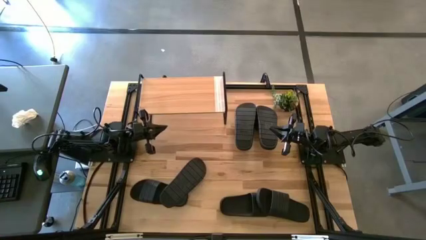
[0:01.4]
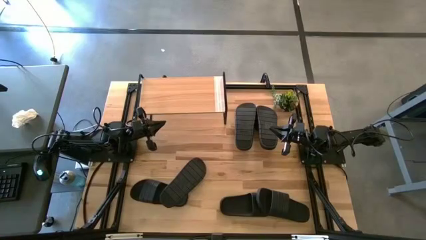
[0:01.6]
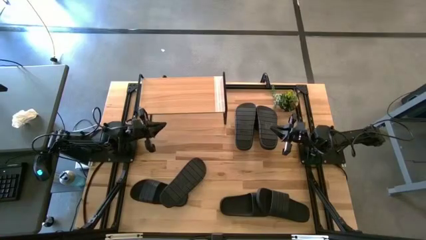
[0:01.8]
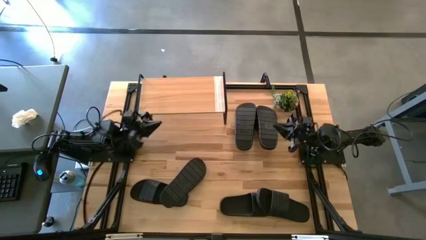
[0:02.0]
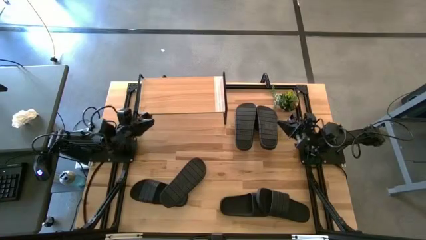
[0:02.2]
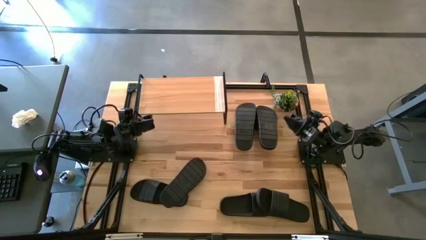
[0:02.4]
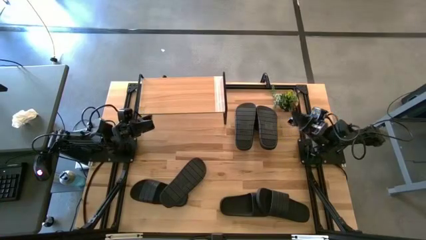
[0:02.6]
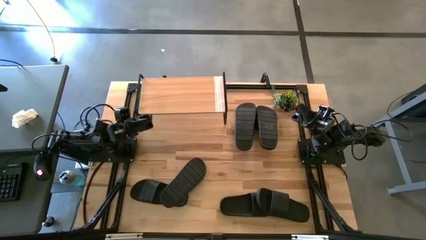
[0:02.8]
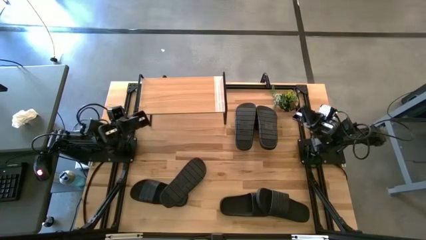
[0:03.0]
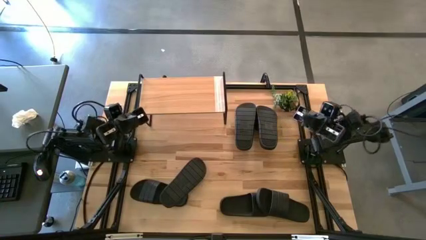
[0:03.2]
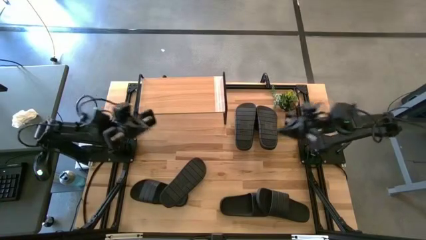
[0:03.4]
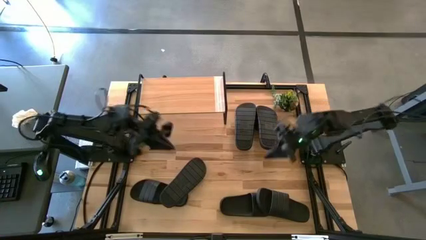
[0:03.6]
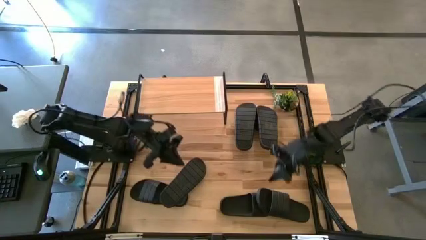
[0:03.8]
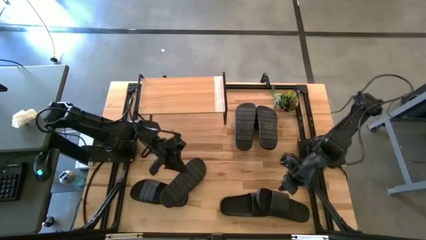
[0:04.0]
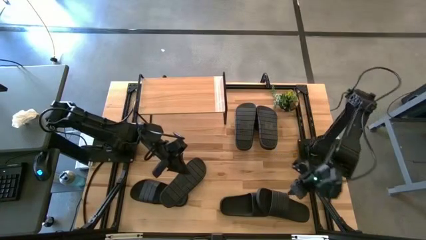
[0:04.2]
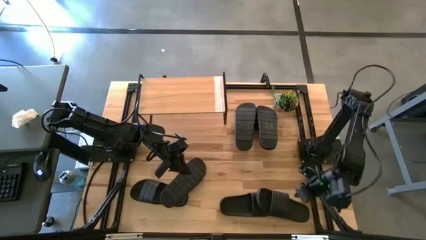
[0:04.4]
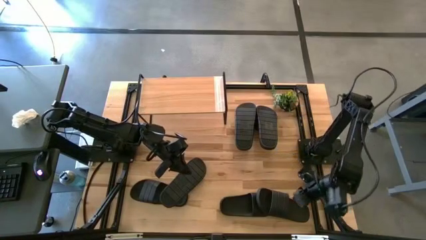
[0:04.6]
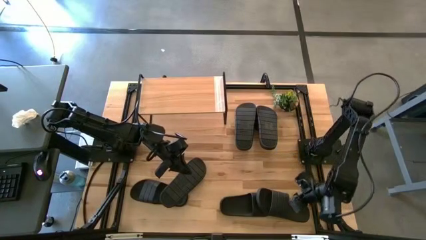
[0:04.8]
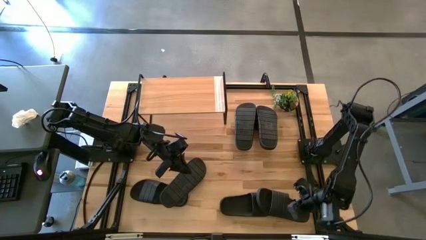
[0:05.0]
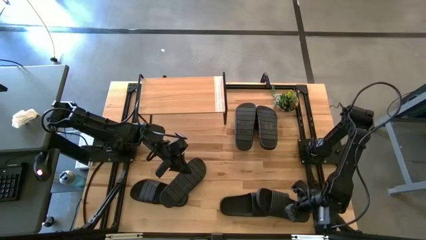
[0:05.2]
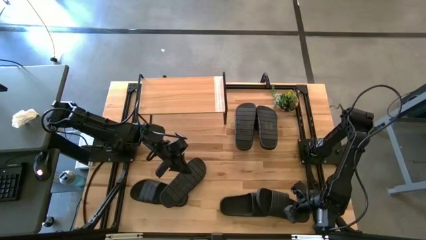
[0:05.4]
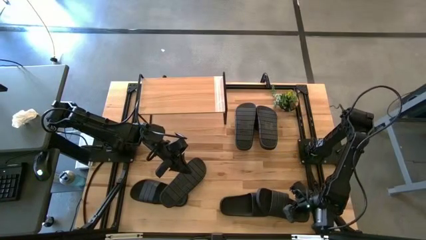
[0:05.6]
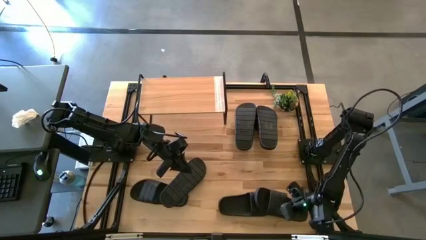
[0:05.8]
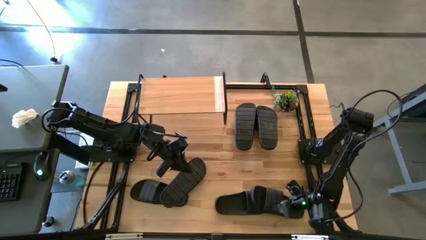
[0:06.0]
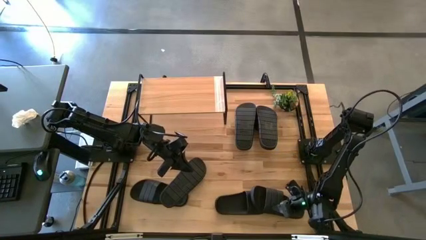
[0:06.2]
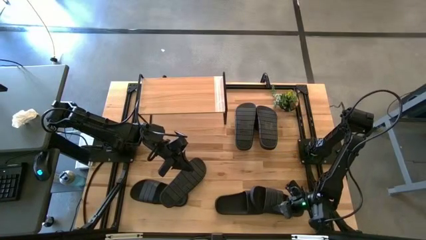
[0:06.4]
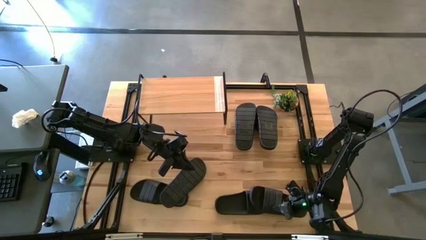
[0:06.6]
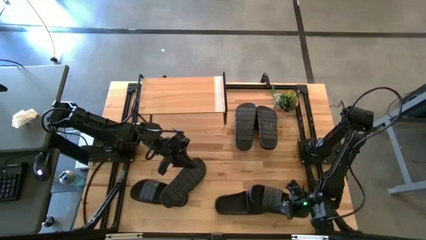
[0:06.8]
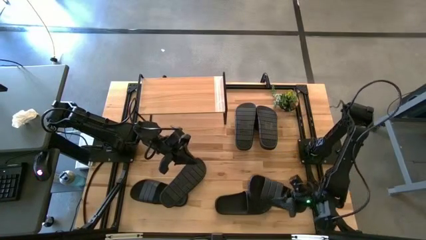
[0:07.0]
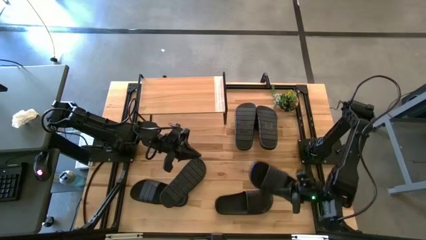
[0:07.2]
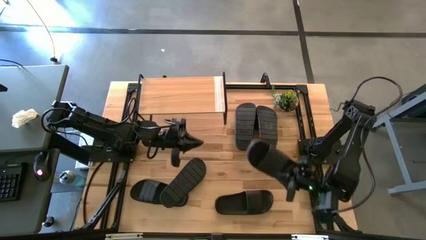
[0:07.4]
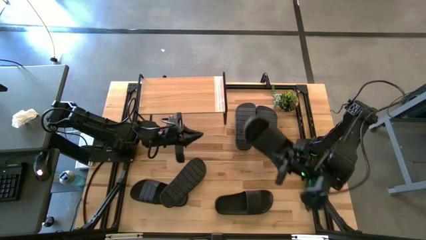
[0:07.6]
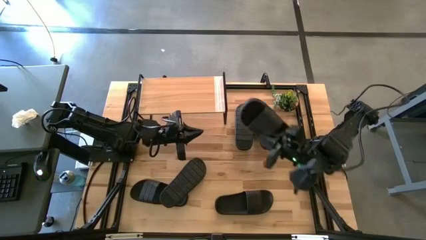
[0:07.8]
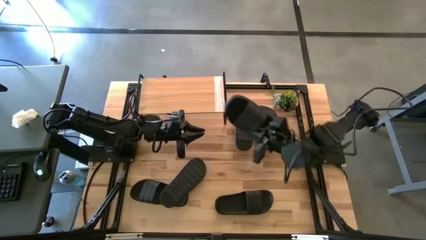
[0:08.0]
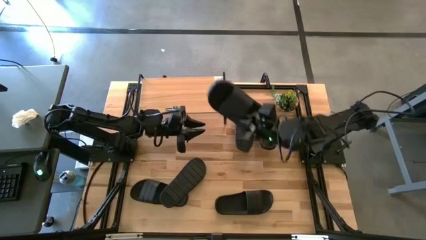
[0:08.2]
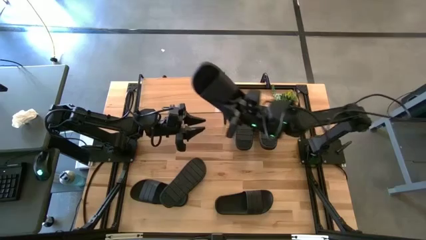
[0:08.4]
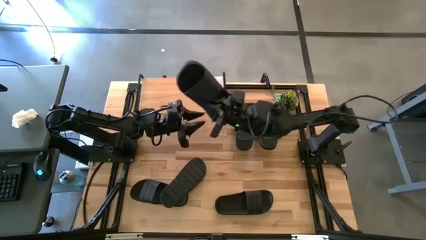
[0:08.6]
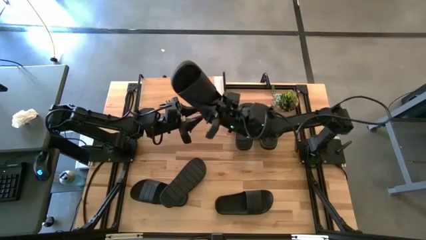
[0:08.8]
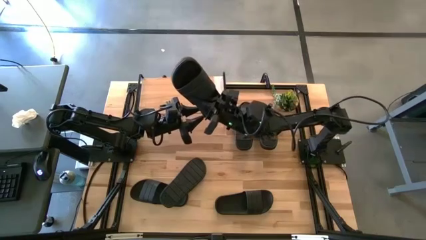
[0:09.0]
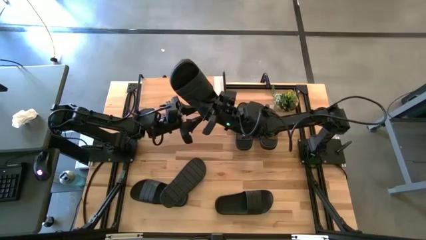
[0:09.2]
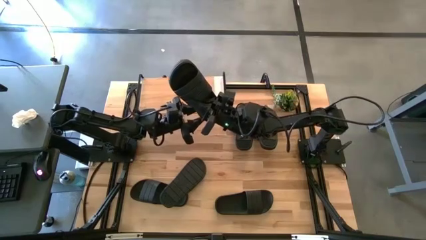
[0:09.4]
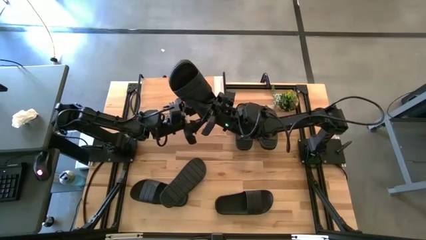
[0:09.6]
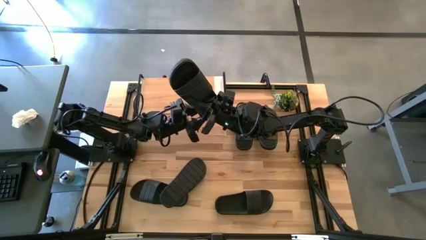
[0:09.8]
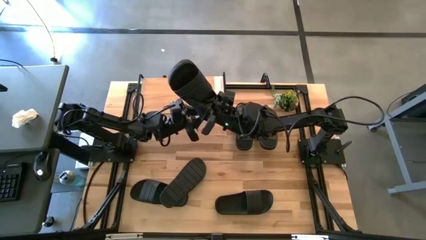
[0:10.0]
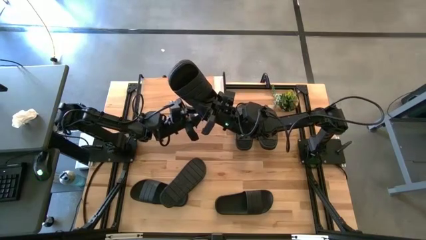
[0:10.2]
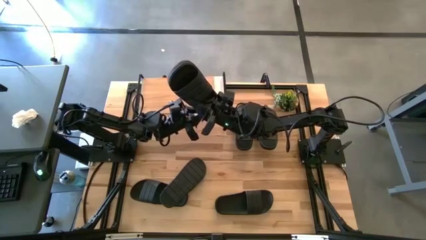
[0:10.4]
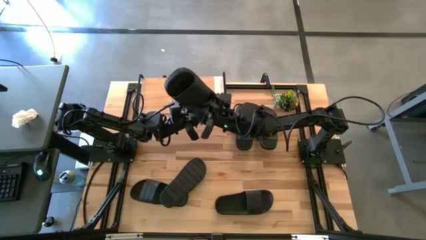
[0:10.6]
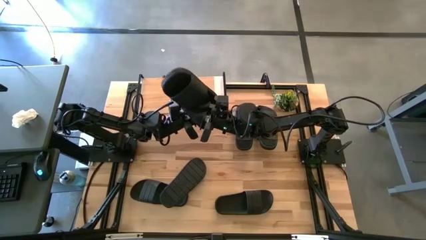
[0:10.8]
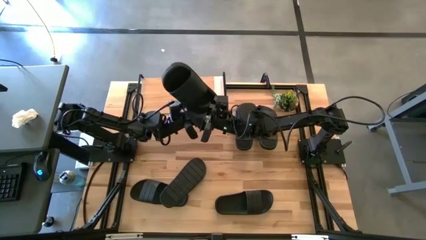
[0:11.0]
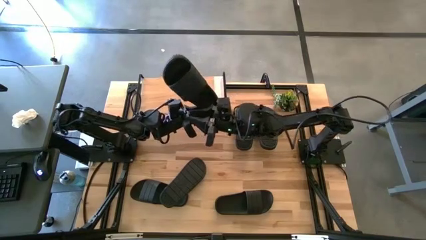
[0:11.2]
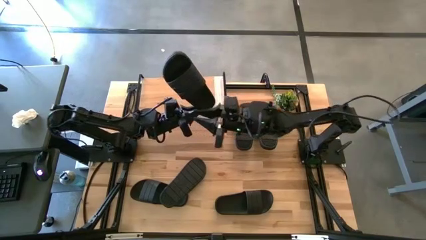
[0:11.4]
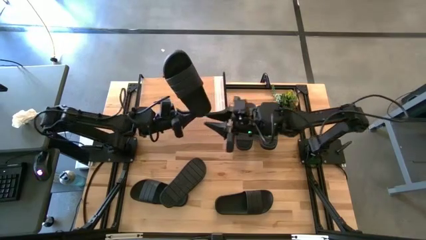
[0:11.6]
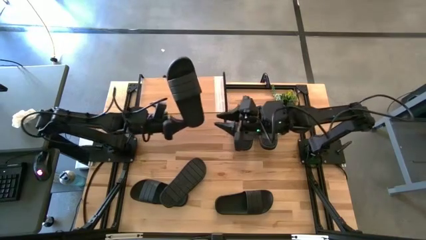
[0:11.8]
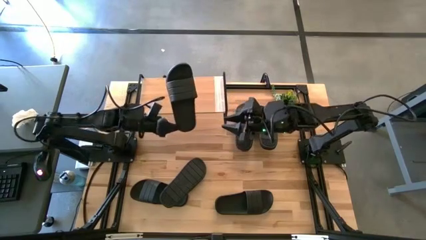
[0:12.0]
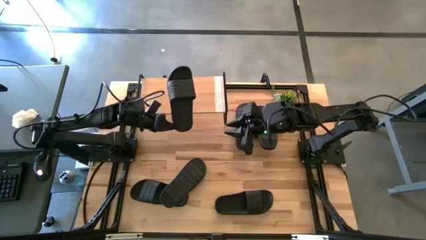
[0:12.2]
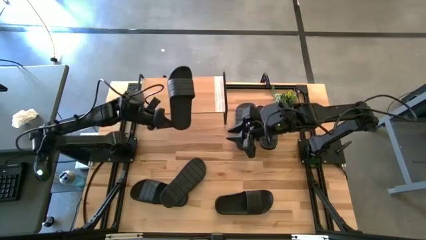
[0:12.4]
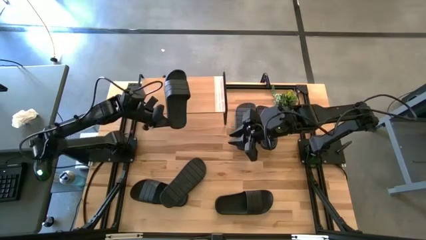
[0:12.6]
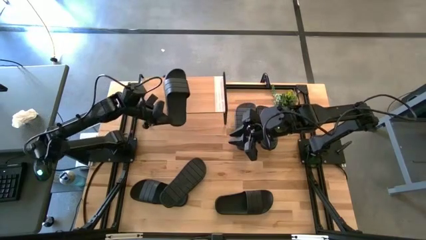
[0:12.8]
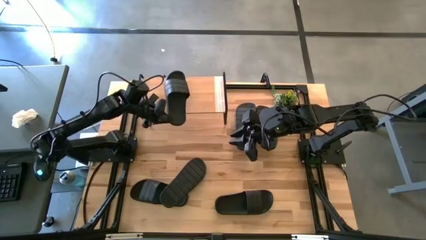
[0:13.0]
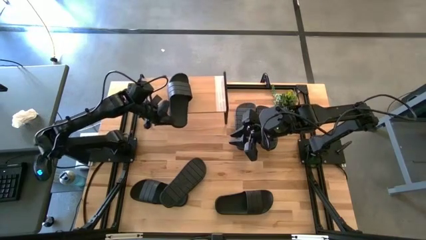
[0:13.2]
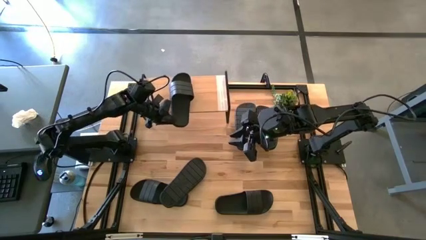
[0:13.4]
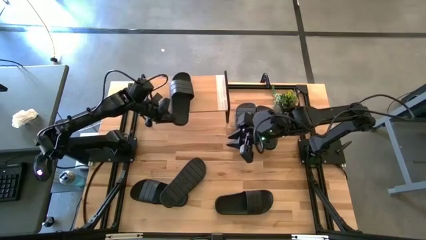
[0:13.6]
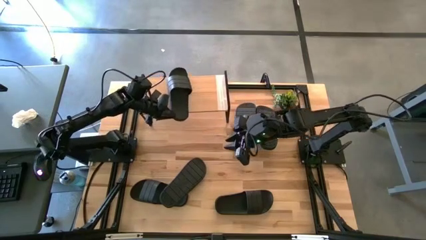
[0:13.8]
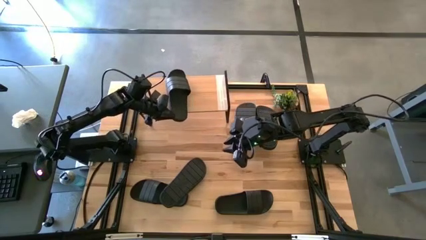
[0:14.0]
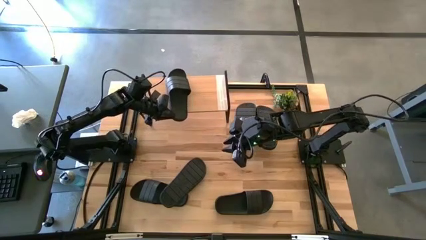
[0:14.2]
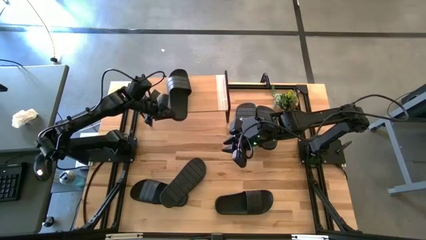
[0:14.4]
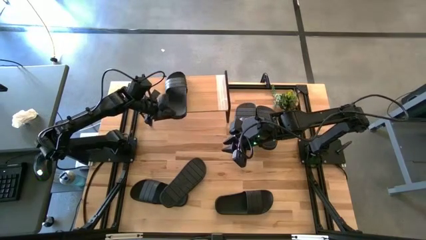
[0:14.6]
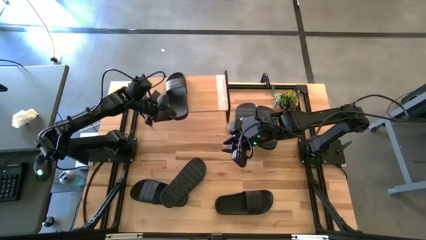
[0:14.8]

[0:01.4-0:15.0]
Task: Pick and place slides into the shelf
Put the black slipper on the shelf

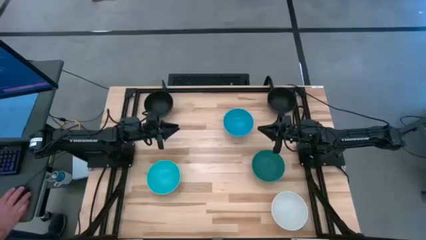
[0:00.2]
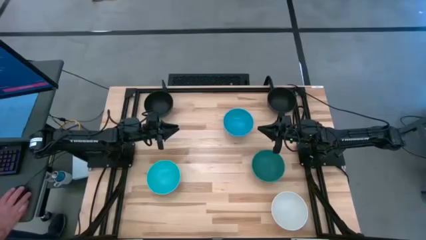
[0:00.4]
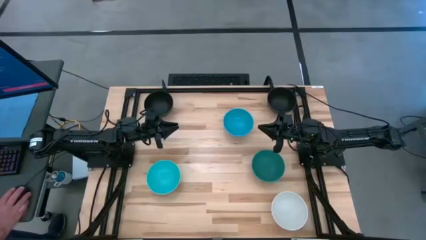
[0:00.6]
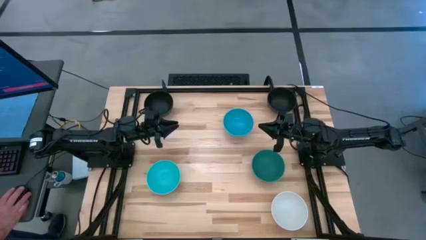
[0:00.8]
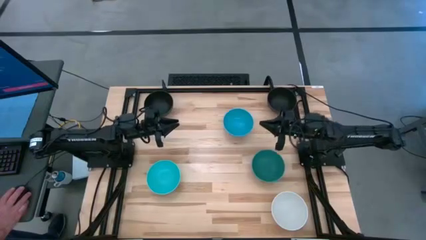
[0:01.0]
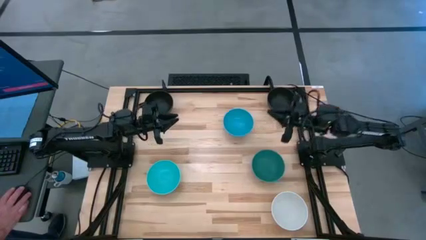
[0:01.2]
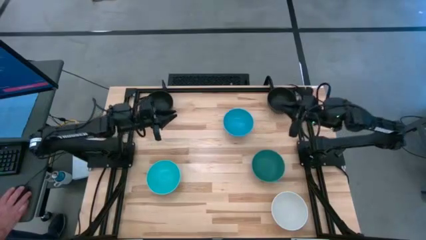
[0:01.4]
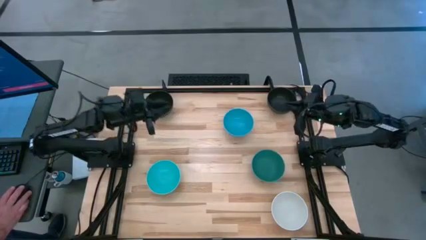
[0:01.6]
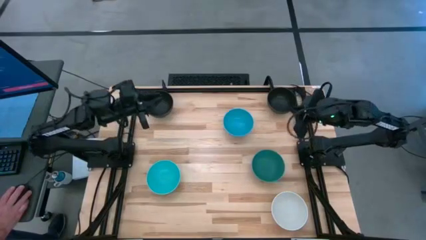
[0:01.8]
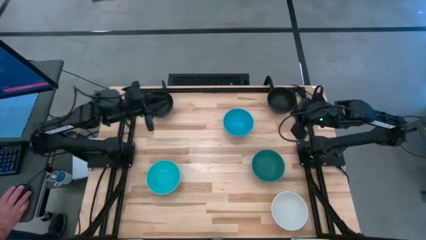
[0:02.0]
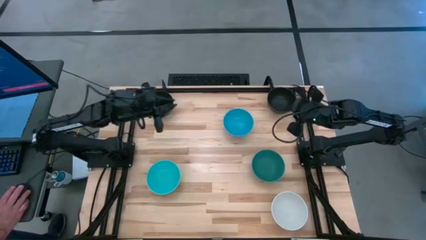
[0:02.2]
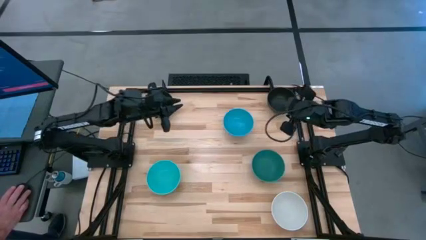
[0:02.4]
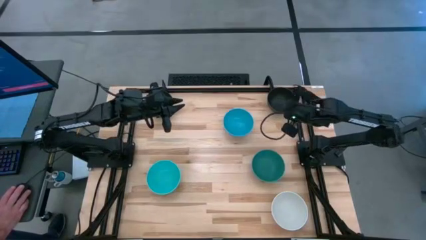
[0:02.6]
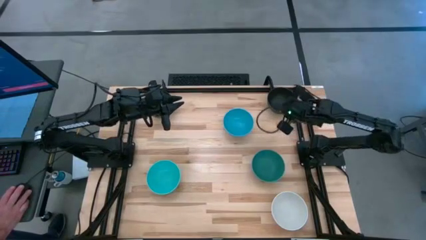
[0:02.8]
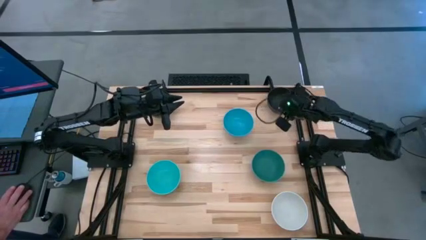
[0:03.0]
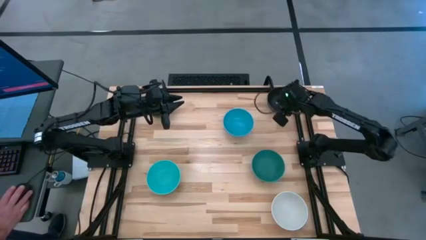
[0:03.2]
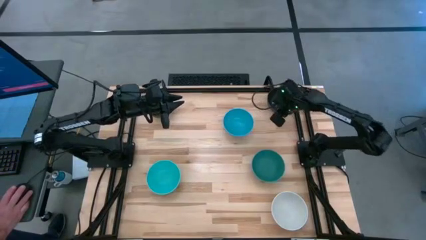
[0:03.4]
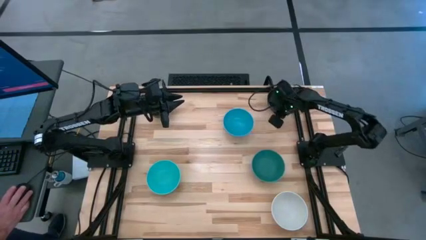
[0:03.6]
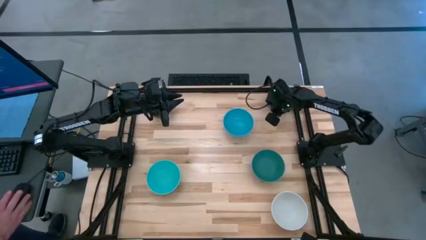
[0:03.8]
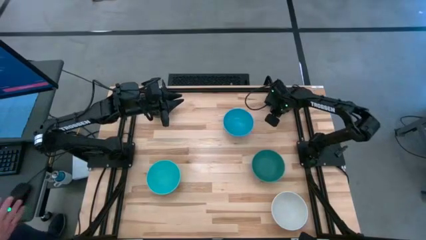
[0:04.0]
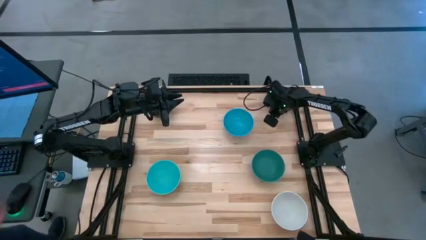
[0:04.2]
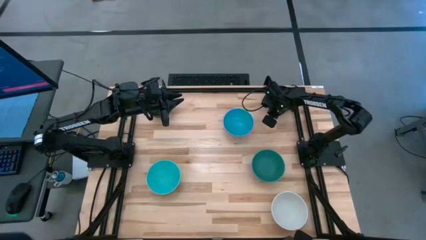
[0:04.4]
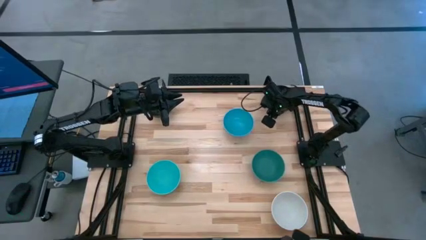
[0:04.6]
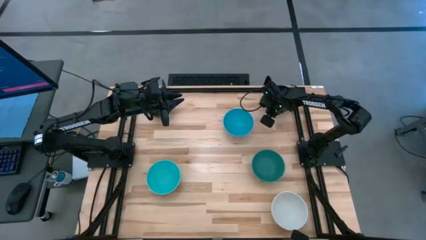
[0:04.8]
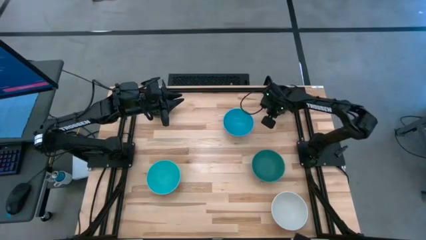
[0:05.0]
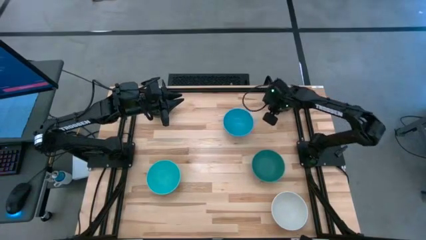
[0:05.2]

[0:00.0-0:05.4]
Task: Nest bowls inside each other
Stack the right black bowl on the blue bowl
